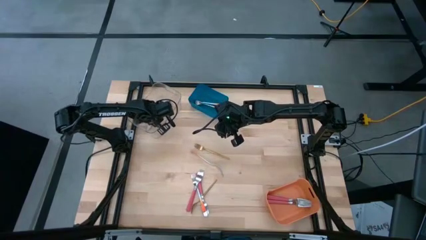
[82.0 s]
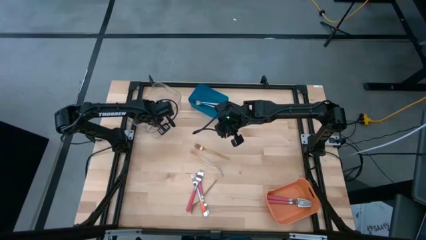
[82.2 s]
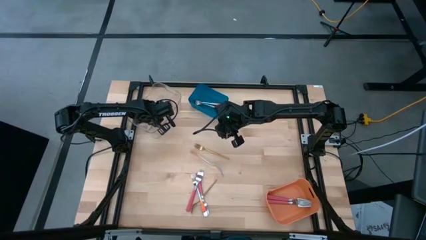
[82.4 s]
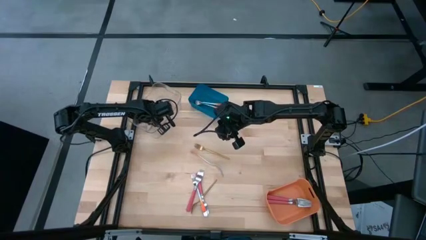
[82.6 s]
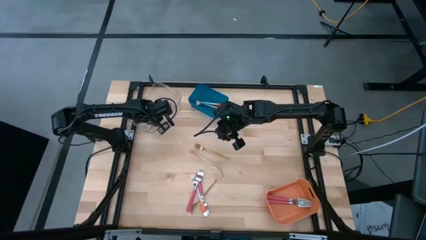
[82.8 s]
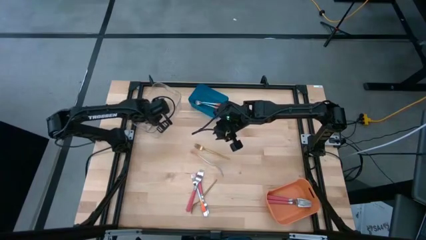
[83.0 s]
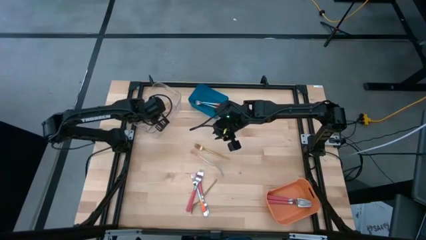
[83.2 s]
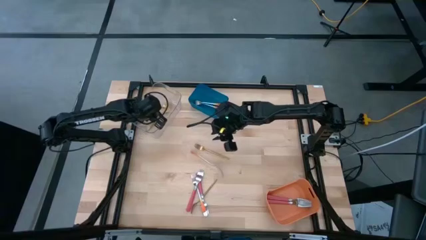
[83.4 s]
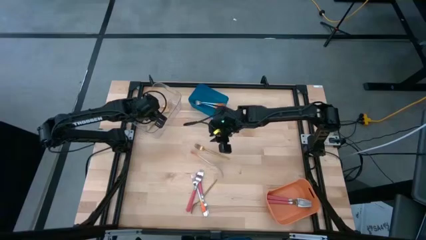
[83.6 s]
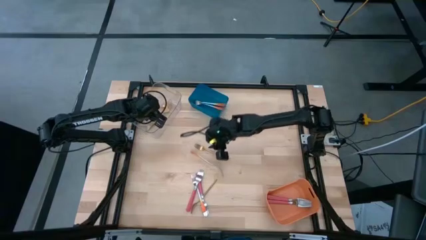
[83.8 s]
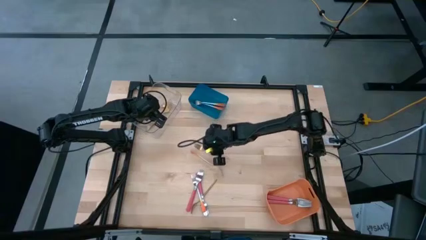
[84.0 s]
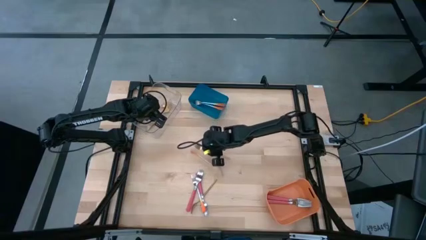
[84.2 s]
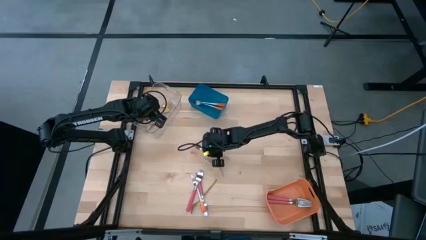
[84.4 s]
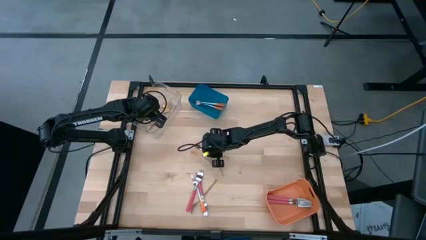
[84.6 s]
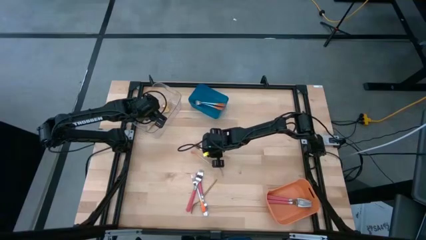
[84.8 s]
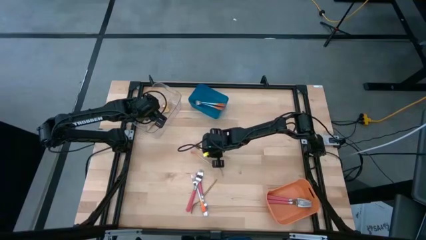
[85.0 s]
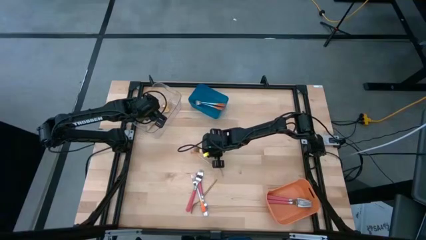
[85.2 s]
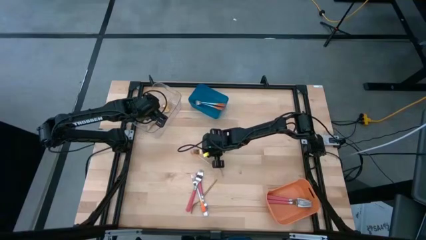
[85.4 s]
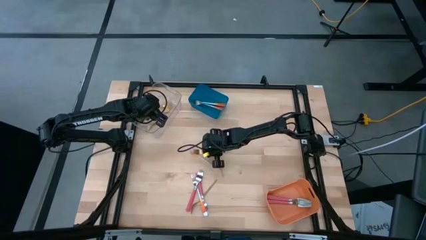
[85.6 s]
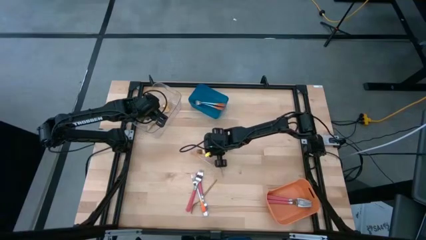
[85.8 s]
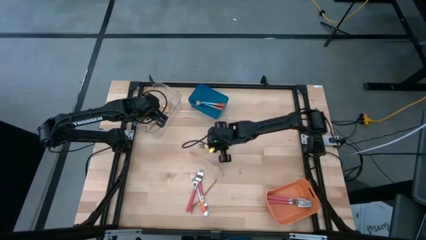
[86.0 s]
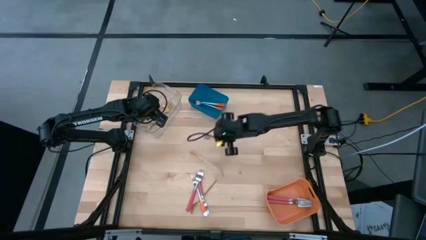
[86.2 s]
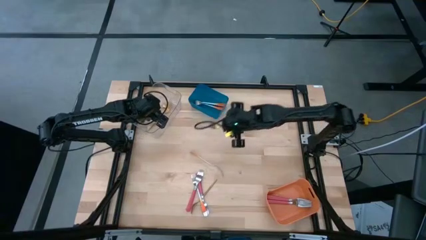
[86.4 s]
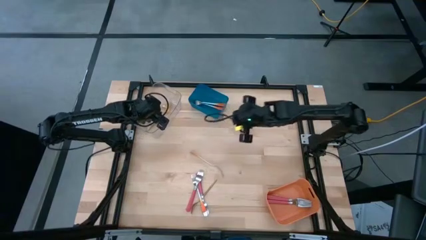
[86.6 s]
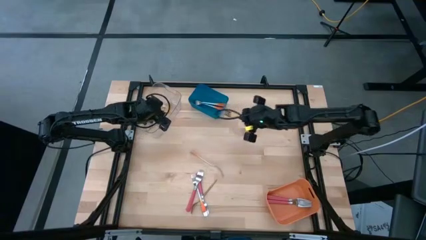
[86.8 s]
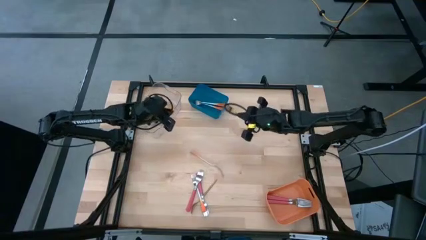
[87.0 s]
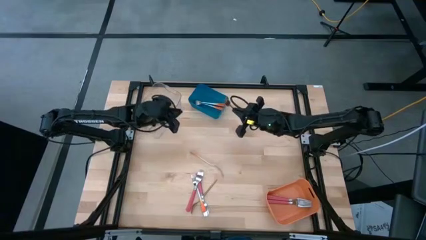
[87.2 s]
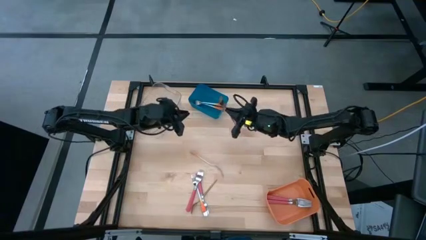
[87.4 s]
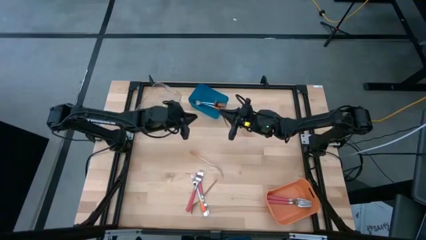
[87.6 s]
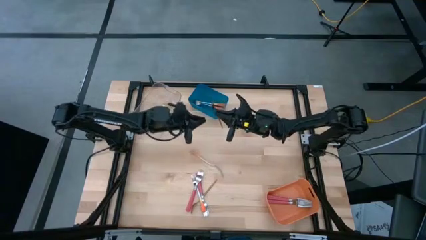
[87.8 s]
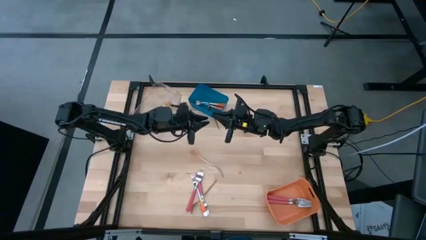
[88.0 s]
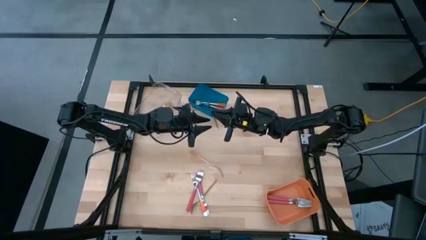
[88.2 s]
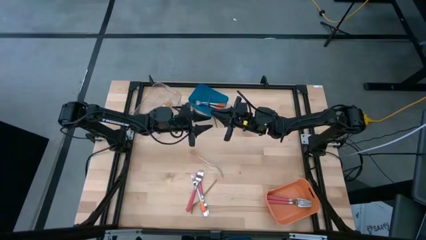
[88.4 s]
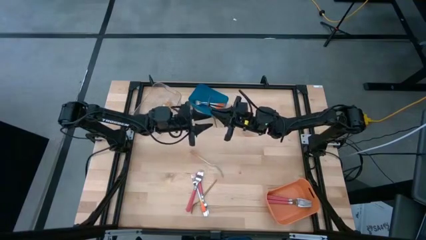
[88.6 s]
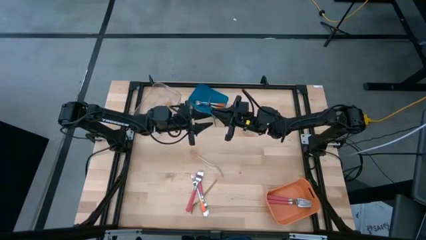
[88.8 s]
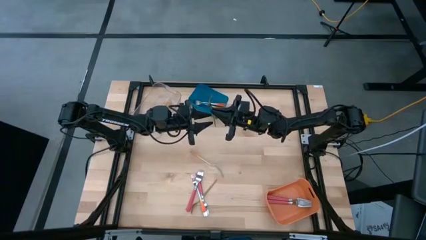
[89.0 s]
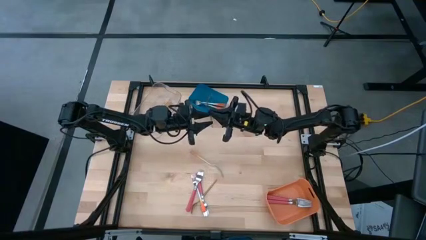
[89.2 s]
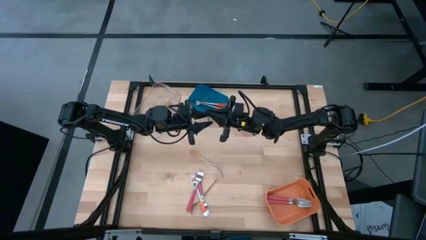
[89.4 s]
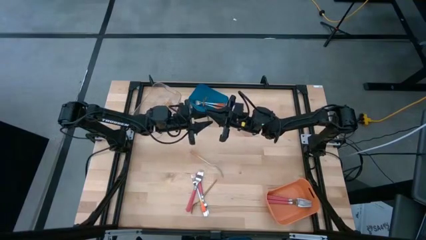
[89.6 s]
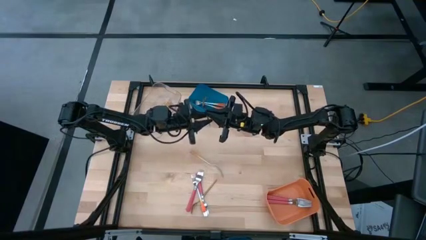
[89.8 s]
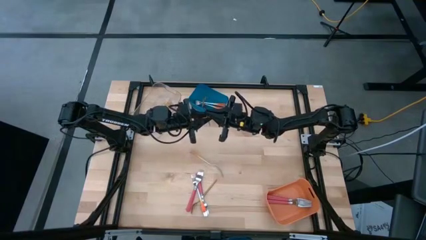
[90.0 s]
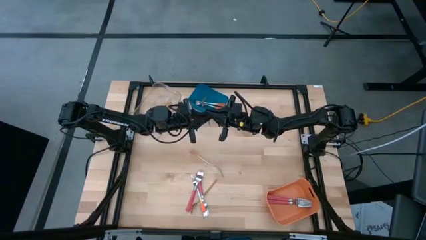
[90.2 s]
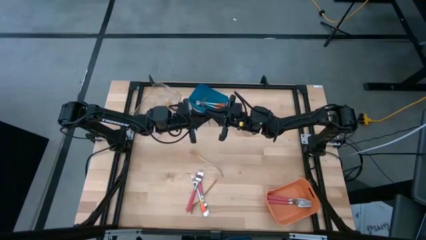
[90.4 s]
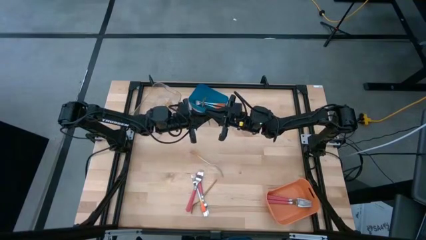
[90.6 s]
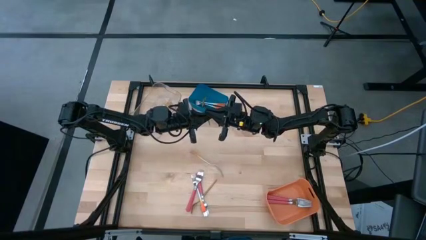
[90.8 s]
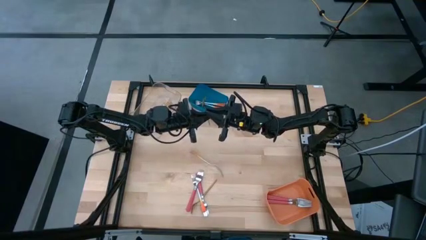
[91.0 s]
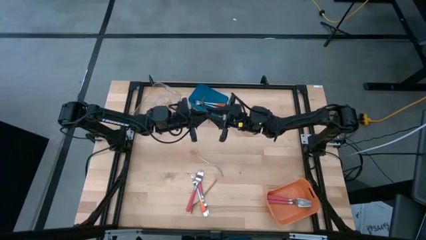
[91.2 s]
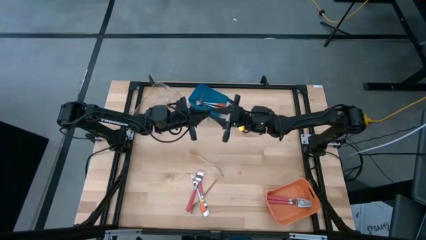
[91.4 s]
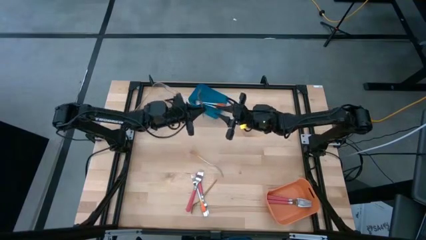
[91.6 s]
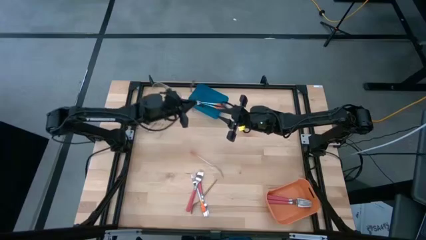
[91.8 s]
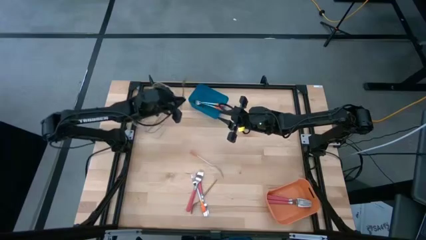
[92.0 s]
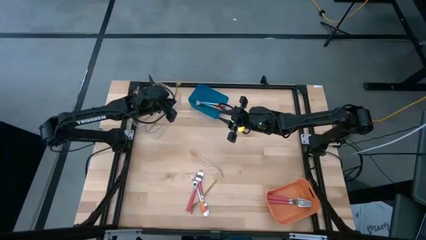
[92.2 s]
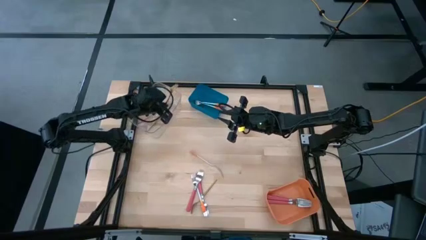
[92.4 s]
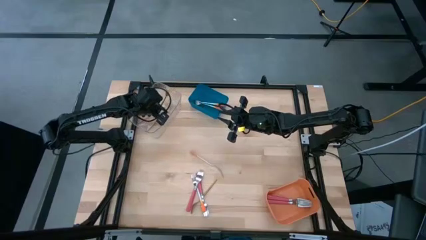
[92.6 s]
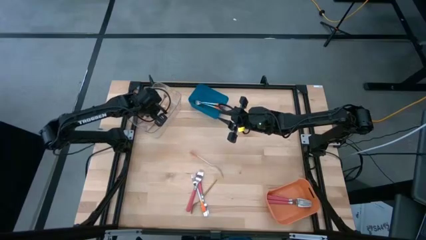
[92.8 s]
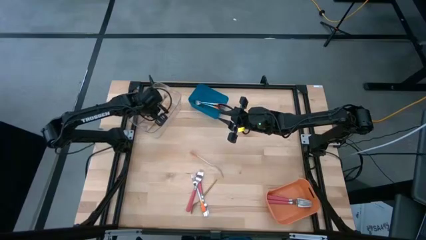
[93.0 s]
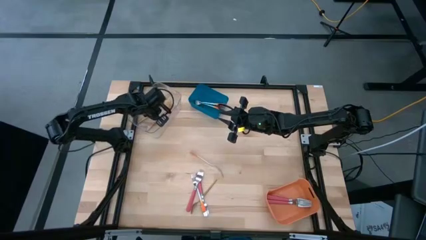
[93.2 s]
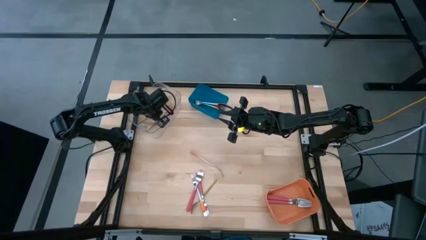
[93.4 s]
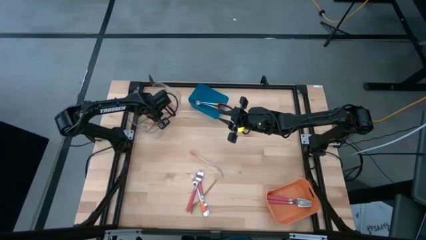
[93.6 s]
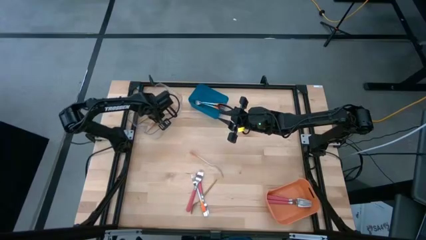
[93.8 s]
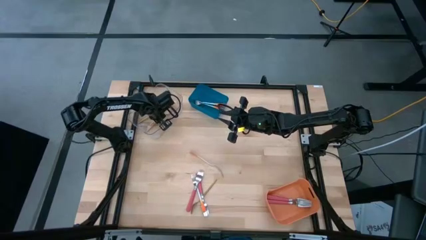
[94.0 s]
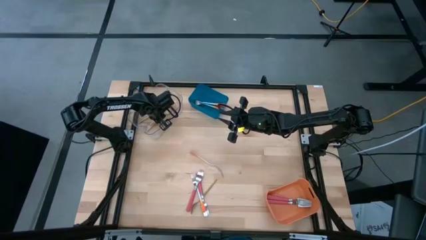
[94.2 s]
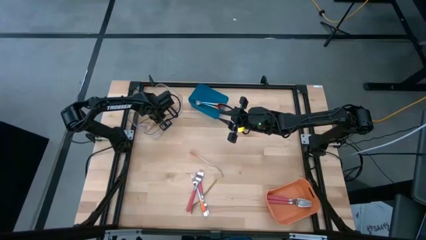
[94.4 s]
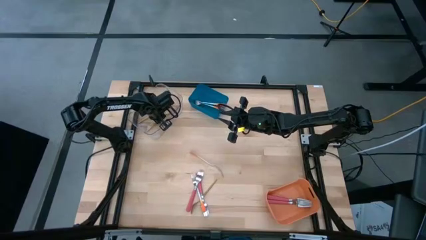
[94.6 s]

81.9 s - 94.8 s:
Task: Sort silverware by color (type)
Put the gold fork into the transparent bin
